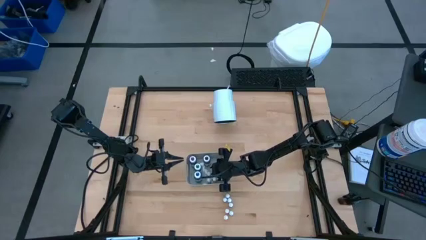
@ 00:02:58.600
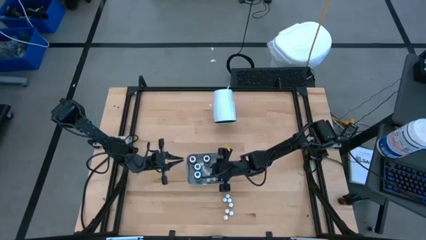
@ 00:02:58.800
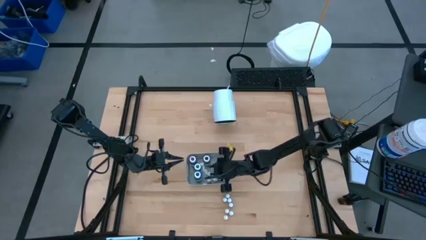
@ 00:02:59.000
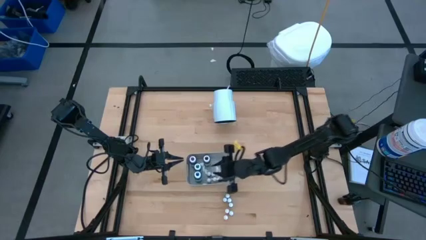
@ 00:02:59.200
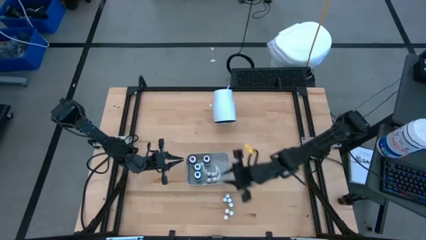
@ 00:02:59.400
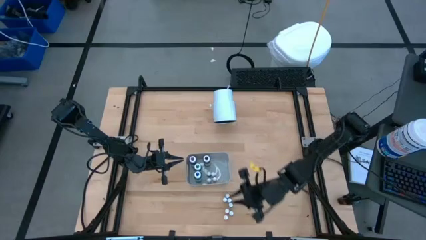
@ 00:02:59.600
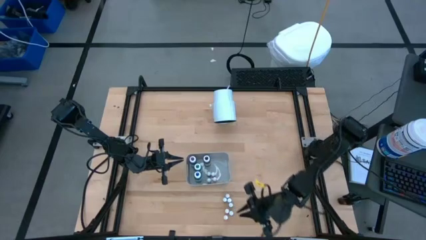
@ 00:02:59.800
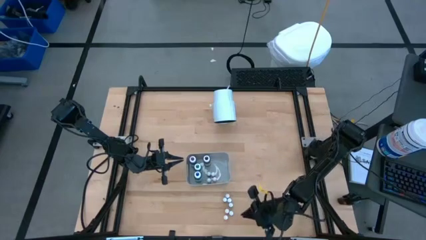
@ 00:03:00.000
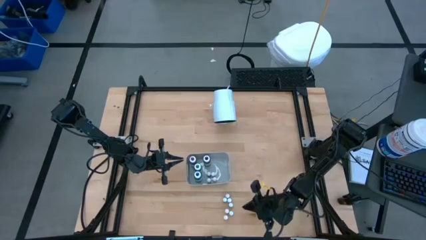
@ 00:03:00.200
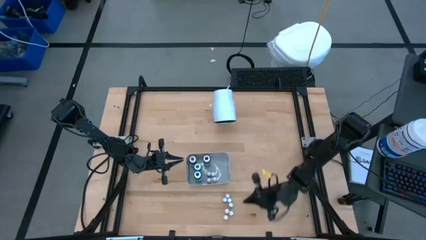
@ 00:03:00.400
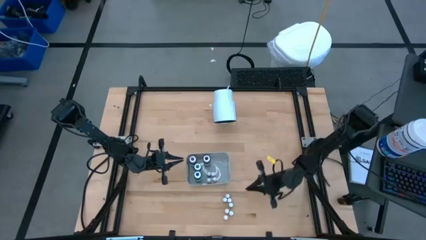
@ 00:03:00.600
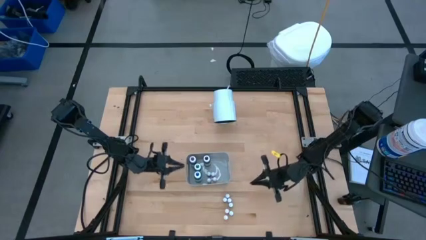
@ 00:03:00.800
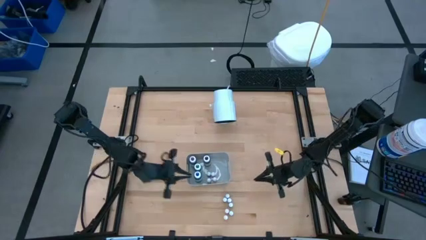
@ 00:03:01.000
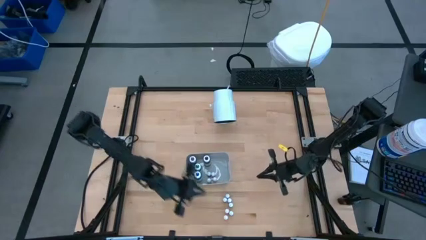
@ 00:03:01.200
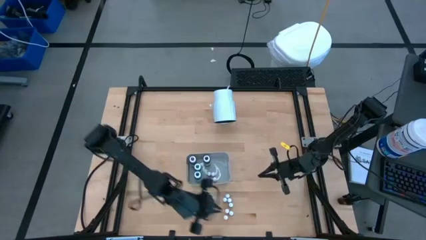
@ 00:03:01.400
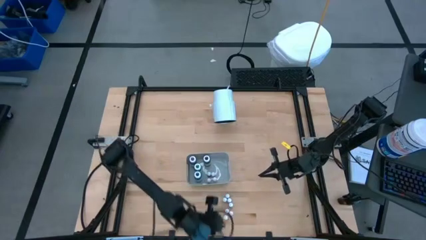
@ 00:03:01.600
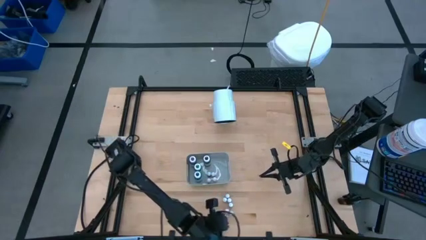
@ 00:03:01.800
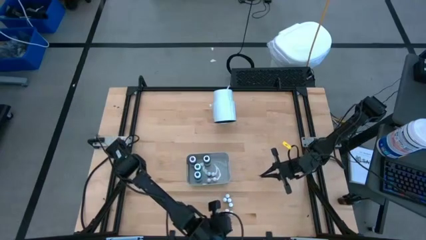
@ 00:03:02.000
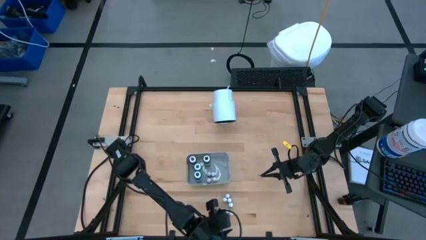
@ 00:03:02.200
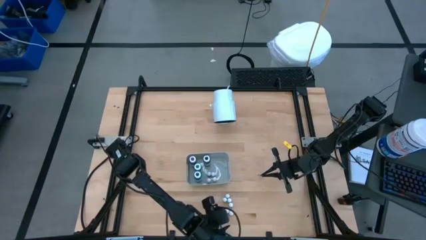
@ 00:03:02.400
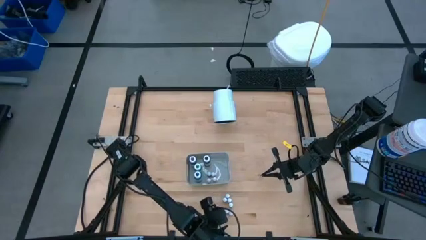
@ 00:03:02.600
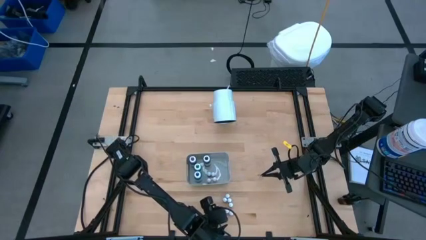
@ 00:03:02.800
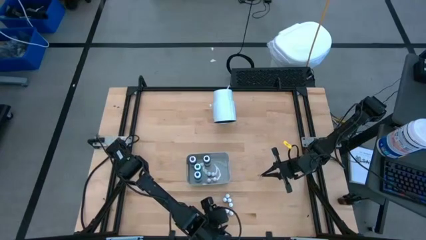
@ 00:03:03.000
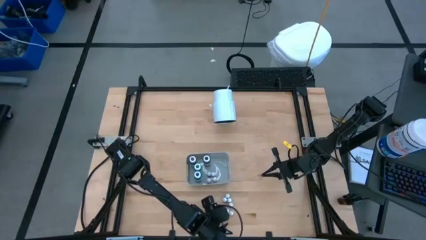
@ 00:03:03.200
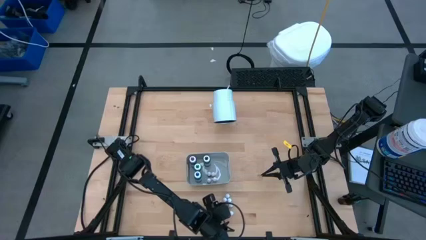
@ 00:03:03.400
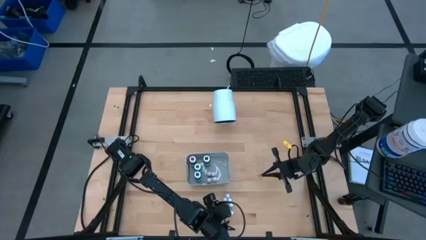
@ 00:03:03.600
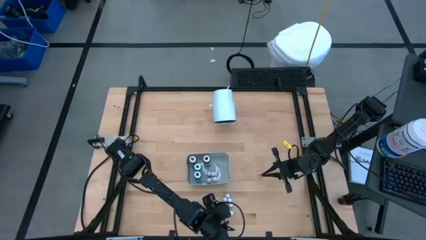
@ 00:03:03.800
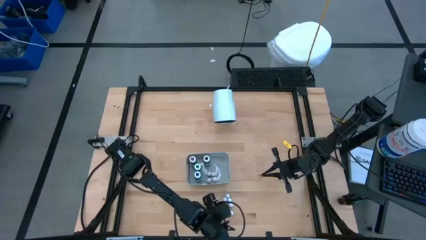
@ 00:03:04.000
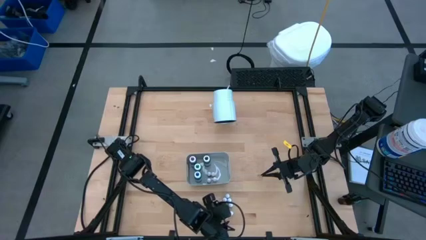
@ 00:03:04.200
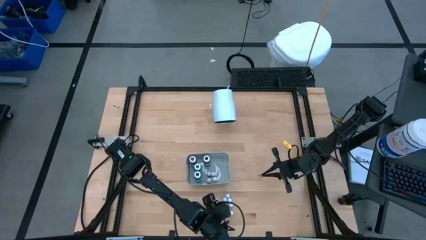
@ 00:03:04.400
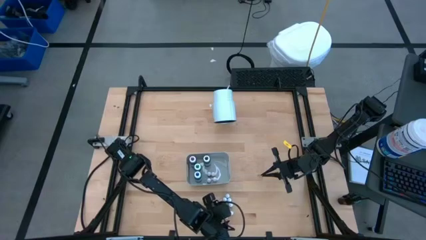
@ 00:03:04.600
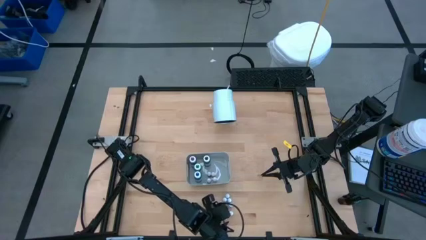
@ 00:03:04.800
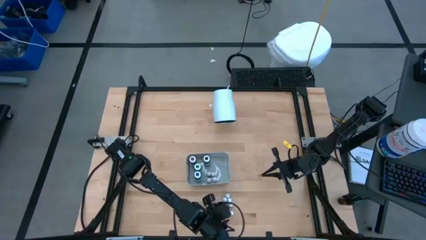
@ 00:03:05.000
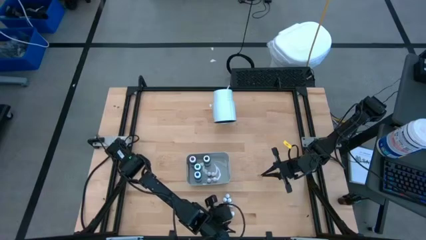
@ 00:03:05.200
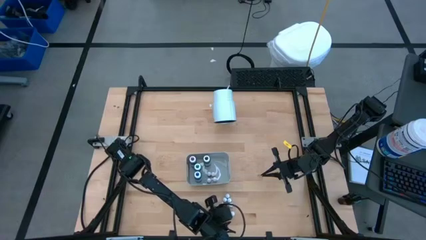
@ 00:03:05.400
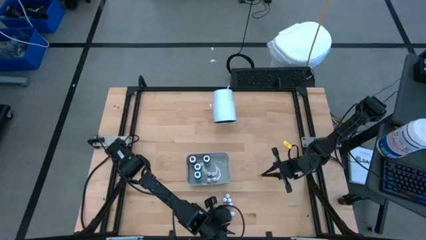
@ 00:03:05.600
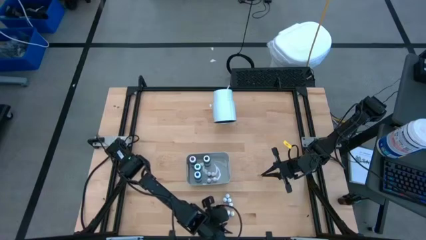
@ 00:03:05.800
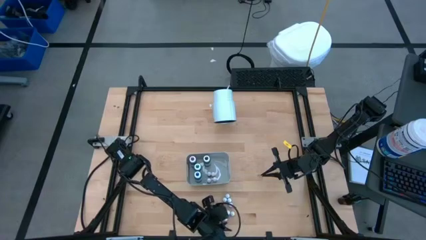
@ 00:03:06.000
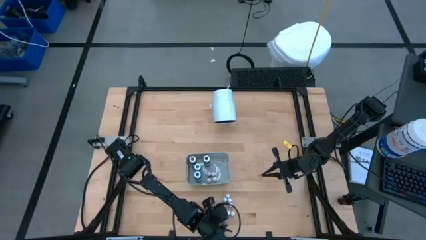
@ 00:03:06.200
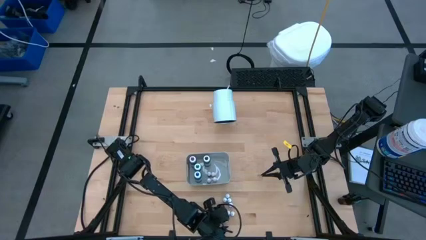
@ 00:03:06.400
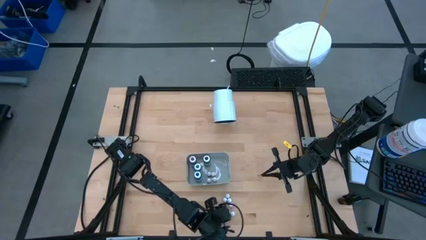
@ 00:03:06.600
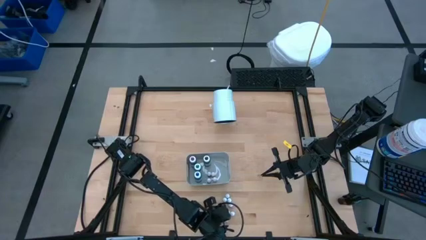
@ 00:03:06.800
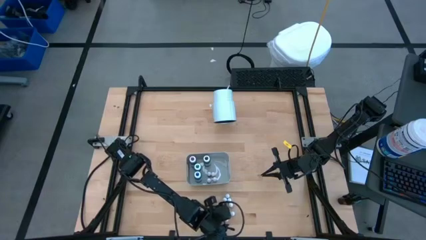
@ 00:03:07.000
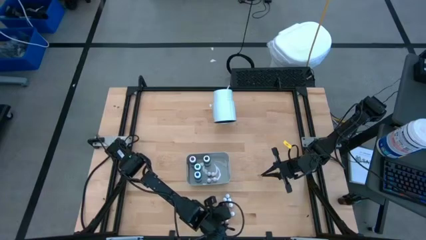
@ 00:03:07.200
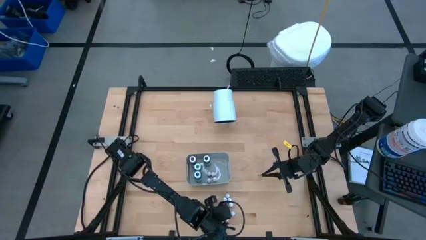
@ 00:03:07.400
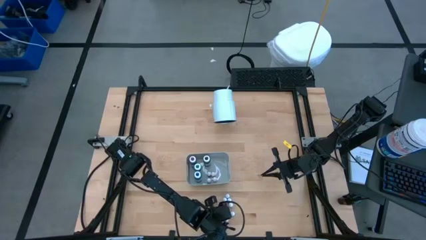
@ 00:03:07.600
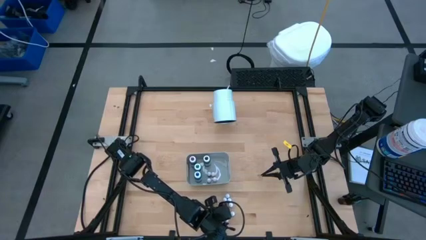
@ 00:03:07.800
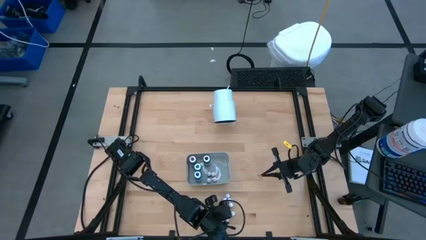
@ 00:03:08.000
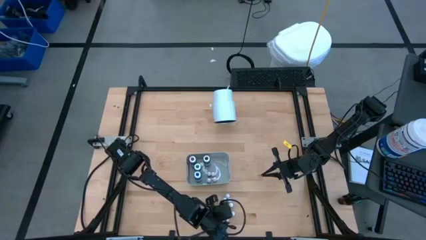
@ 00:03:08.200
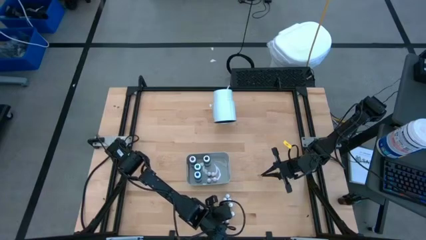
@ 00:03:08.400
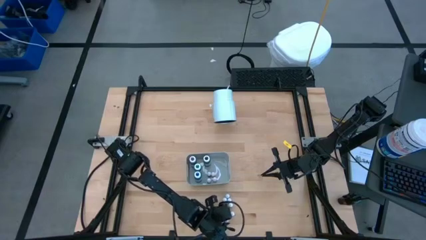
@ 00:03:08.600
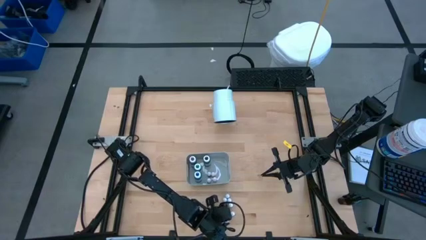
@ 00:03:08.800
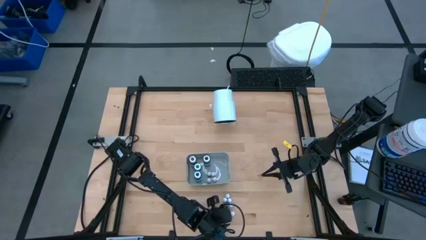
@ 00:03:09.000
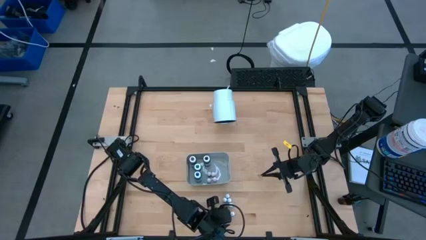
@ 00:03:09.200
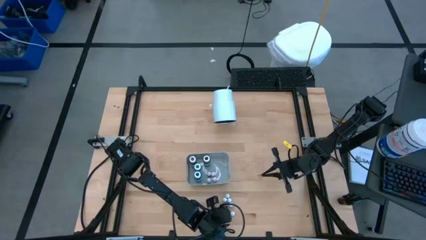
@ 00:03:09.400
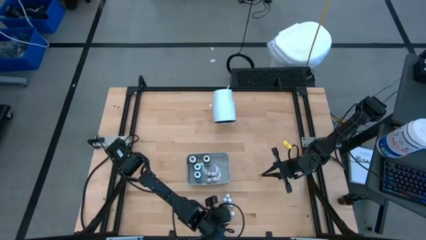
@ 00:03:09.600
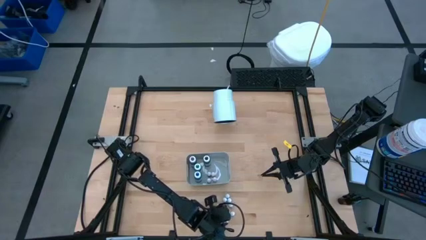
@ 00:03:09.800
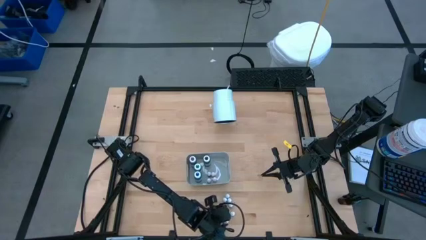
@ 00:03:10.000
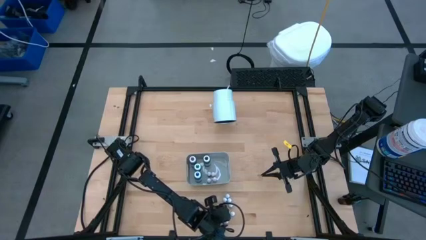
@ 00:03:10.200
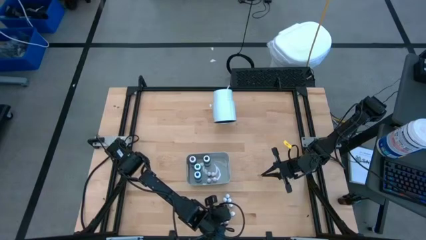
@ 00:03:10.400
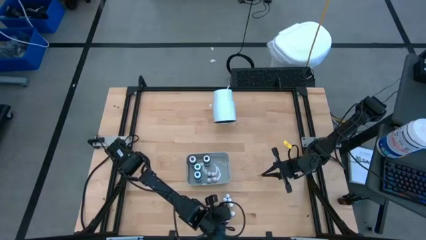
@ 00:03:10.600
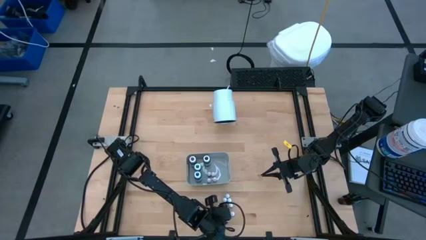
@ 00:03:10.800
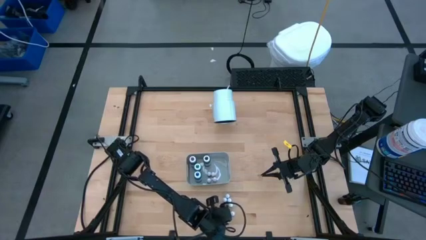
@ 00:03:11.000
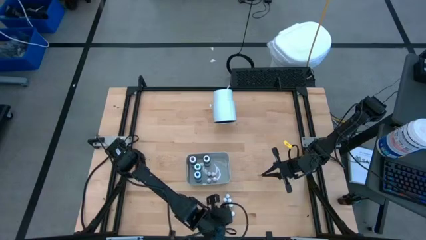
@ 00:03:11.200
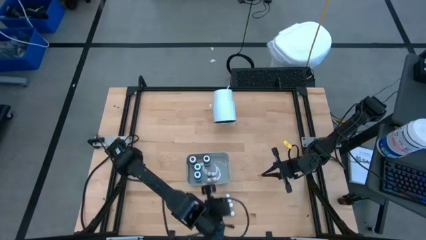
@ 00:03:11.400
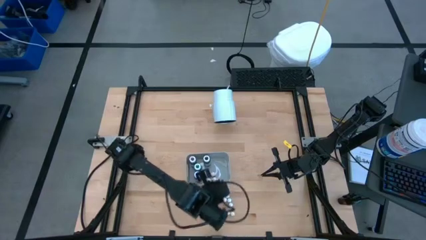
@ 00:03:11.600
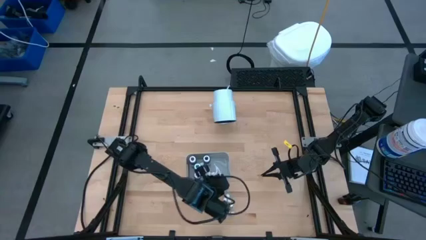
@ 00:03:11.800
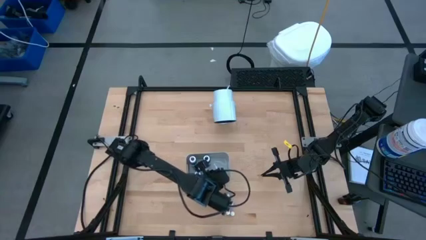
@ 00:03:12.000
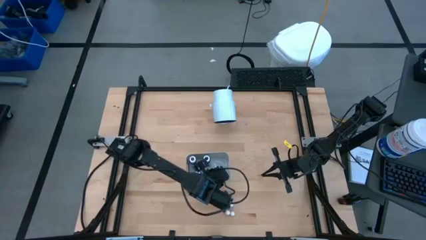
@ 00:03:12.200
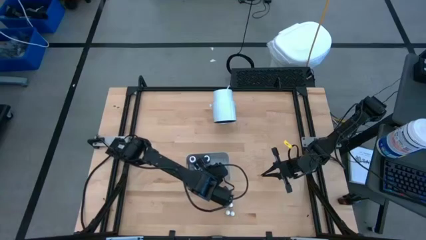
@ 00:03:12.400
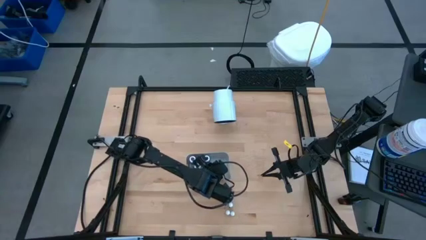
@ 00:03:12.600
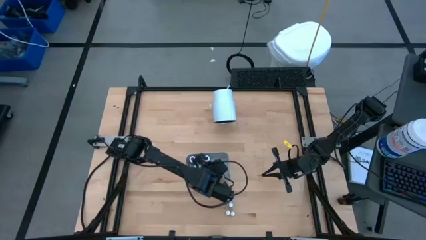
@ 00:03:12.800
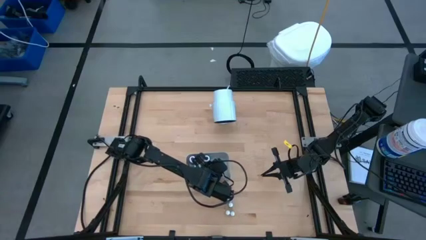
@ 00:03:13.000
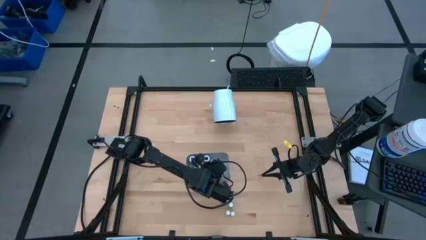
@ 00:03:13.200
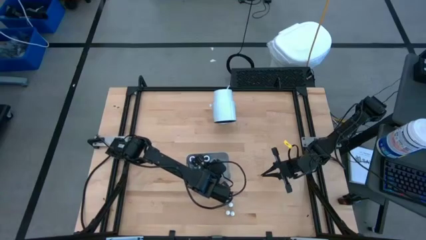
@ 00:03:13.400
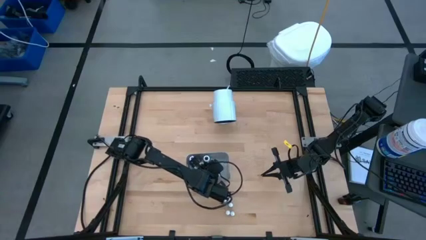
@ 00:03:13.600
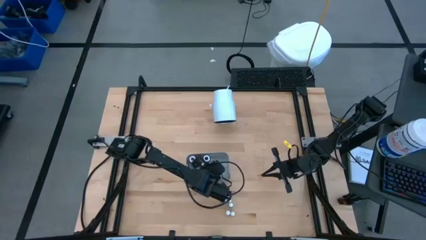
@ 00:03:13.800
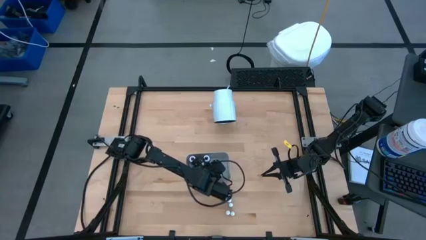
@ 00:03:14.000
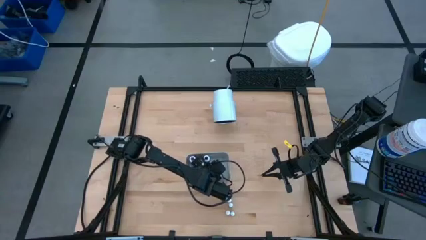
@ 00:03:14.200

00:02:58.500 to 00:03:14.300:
Task: Pick & Place food coloring
Put the orange food coloring bottle into the gray bin
